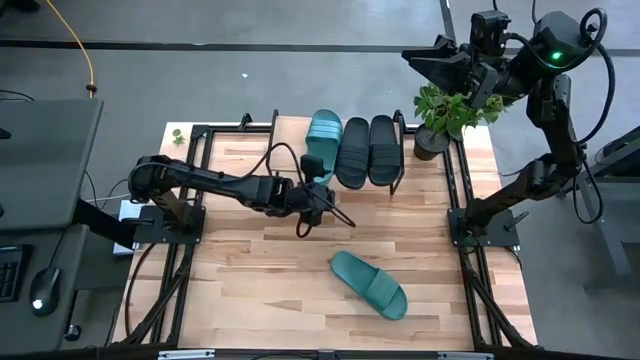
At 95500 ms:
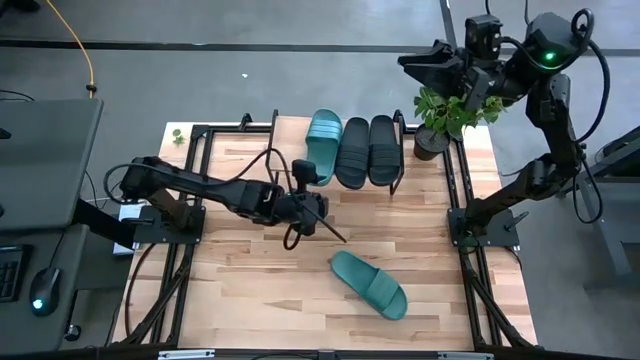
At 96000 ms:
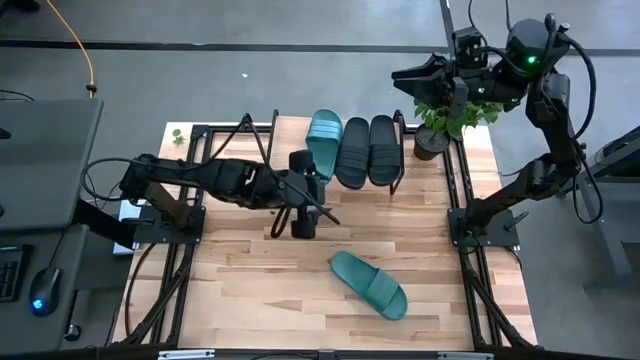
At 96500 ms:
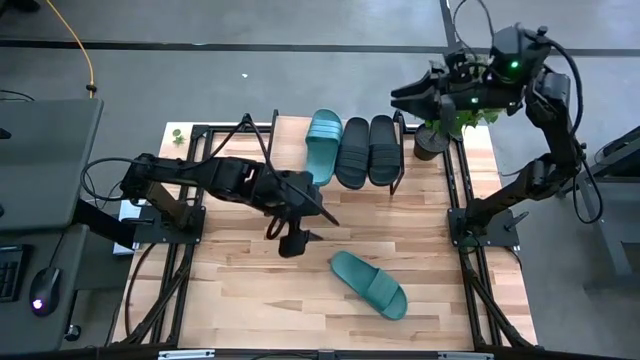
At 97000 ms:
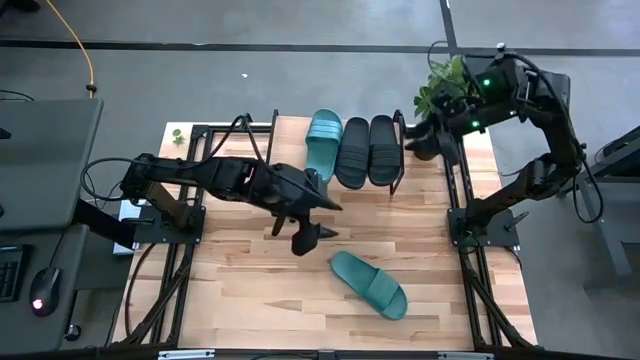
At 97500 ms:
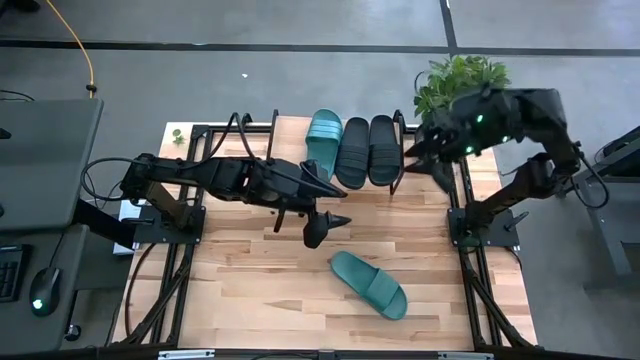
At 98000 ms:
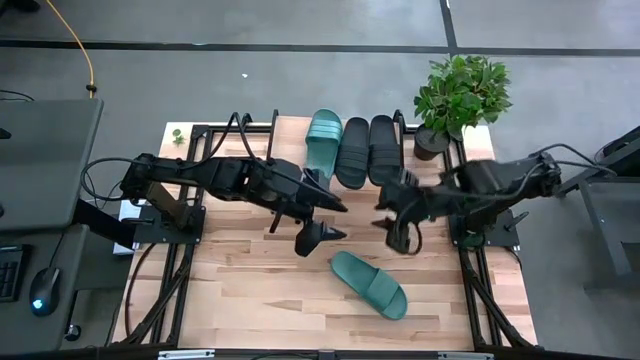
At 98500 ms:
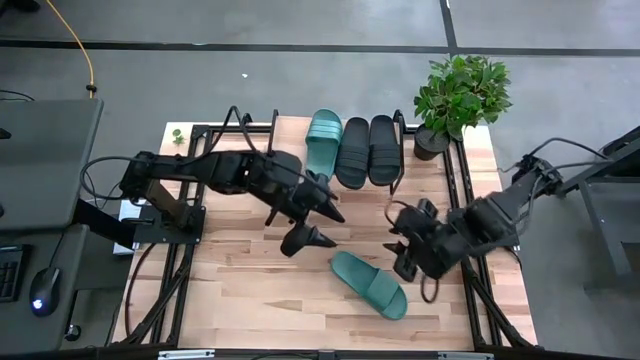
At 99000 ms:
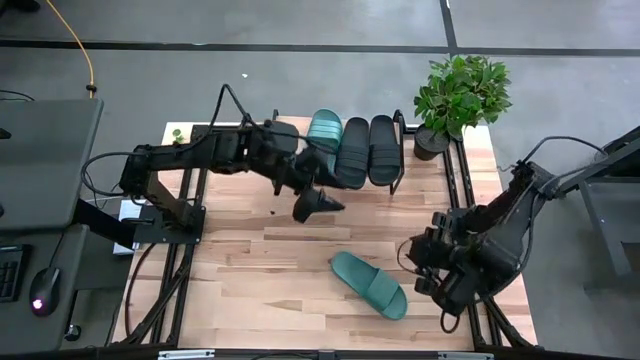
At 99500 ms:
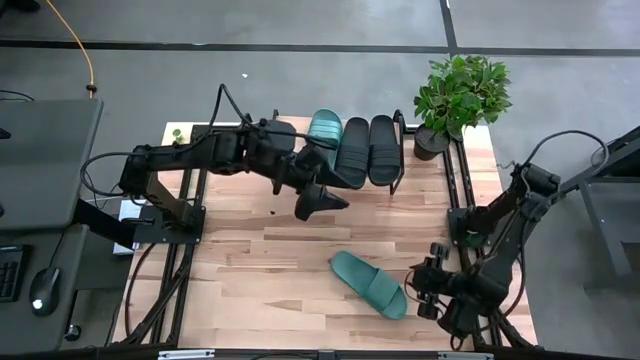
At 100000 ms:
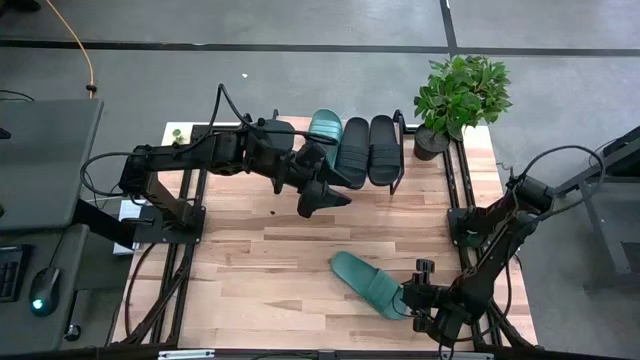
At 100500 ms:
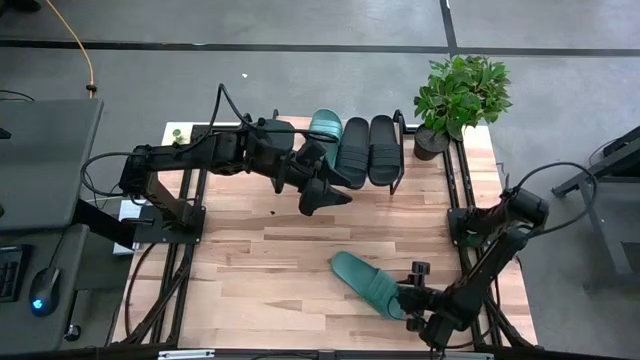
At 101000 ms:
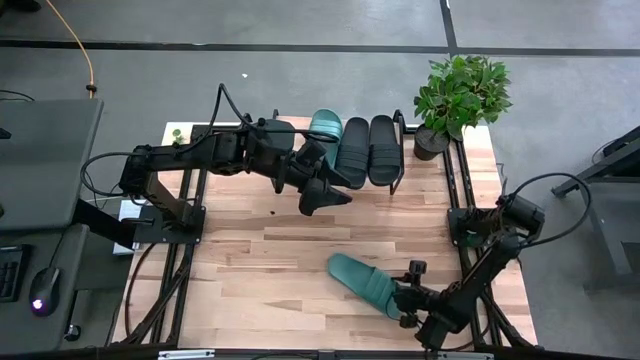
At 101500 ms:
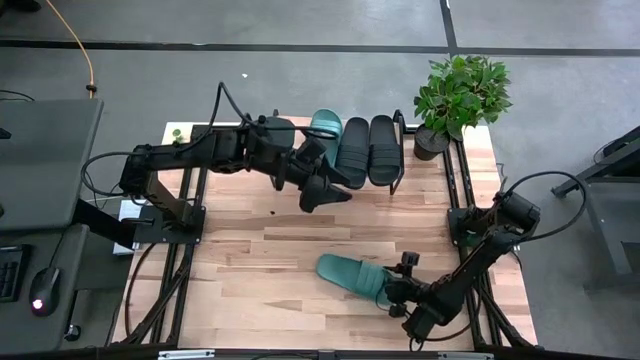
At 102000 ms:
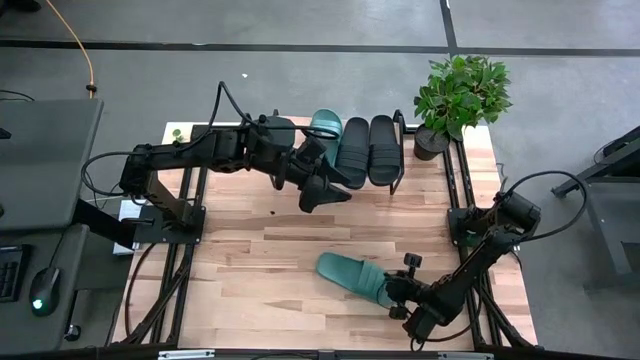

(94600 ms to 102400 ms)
Task: Pick and place slides into the shelf
Put the green slipper on the shelf

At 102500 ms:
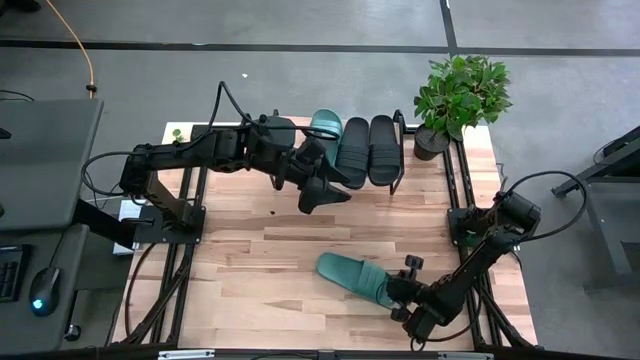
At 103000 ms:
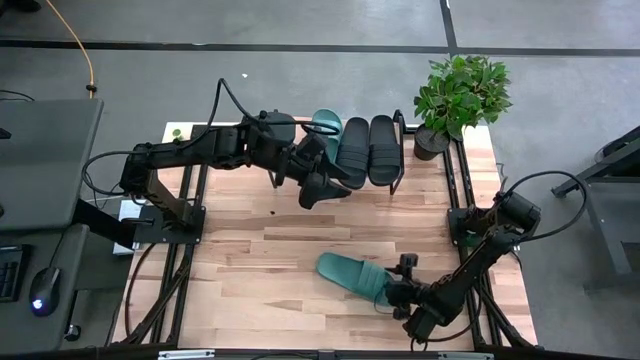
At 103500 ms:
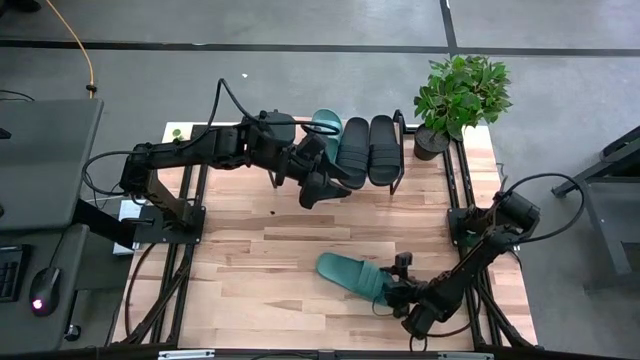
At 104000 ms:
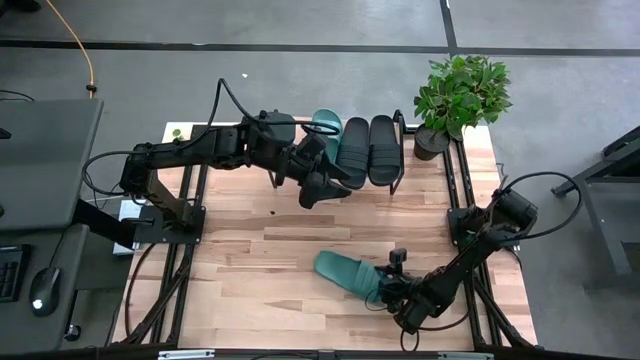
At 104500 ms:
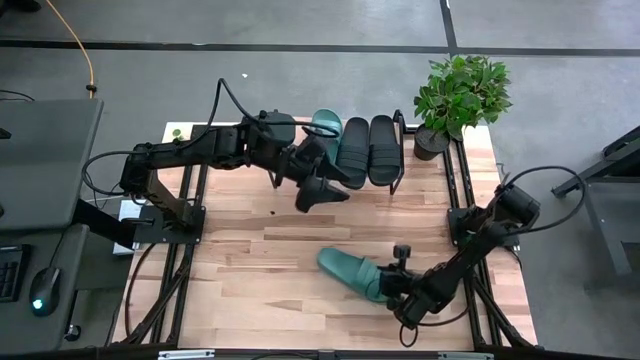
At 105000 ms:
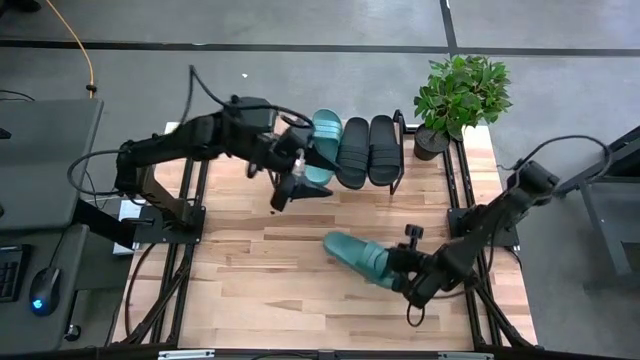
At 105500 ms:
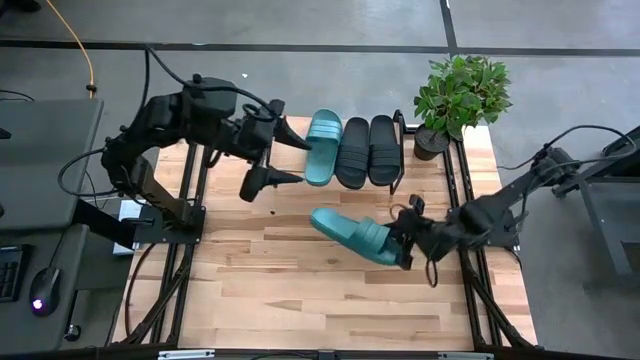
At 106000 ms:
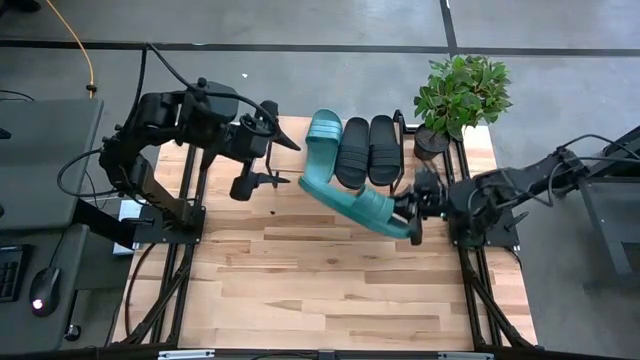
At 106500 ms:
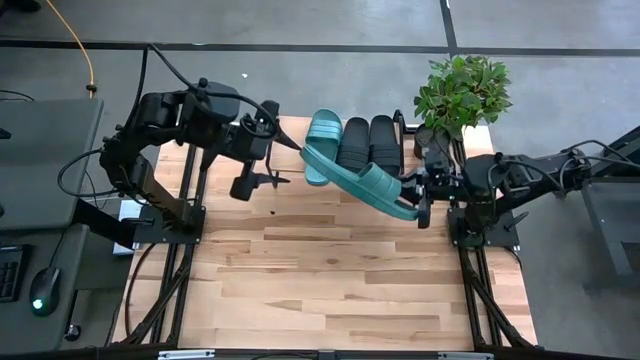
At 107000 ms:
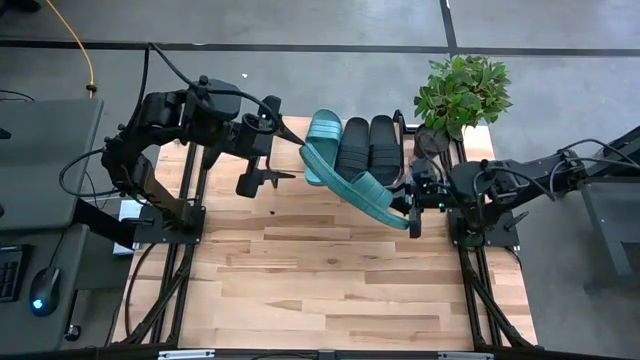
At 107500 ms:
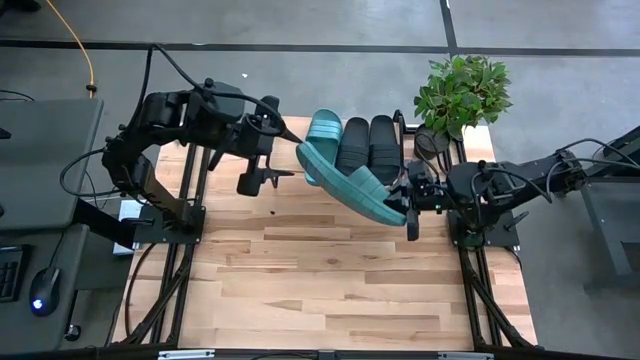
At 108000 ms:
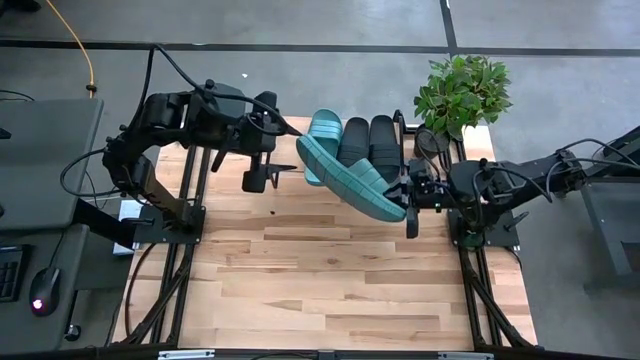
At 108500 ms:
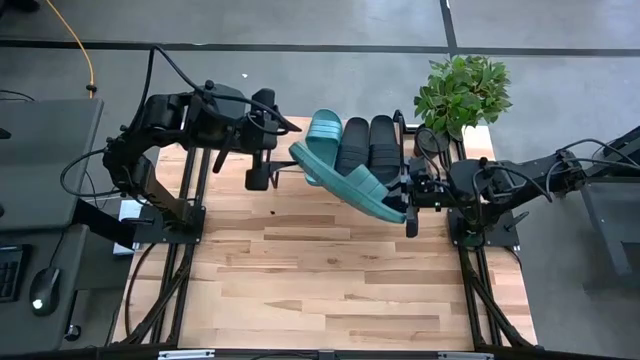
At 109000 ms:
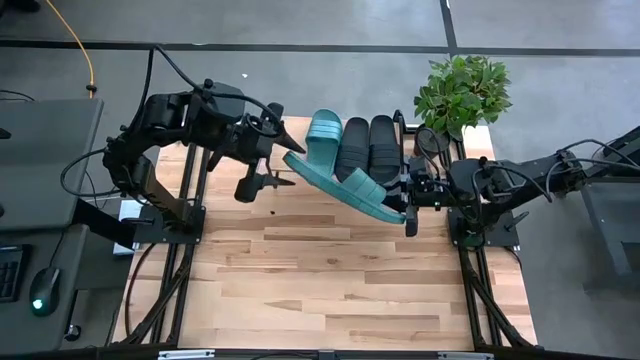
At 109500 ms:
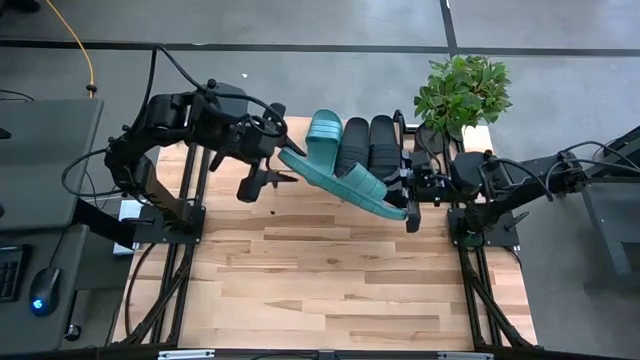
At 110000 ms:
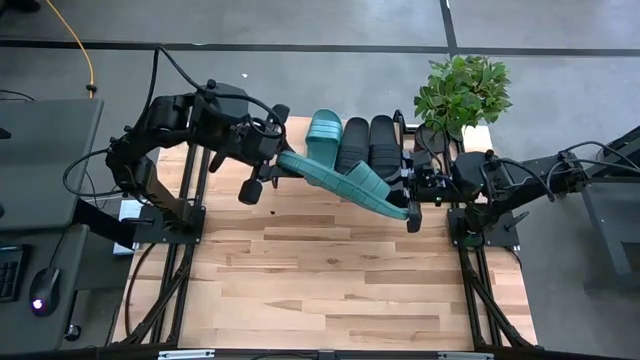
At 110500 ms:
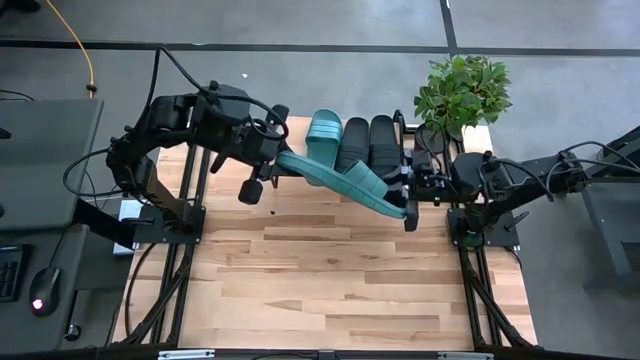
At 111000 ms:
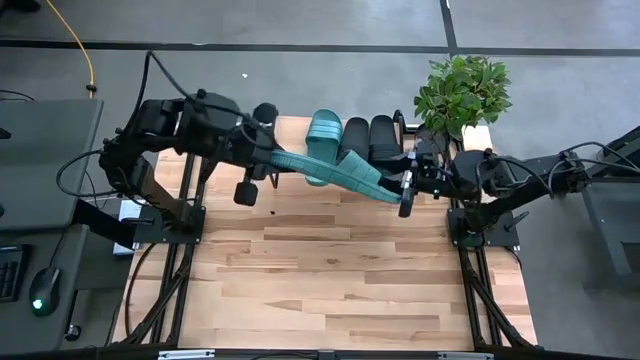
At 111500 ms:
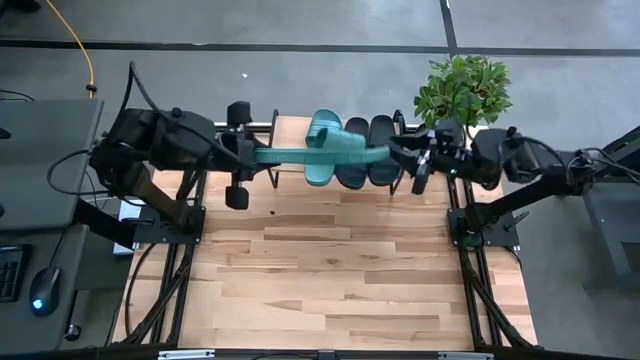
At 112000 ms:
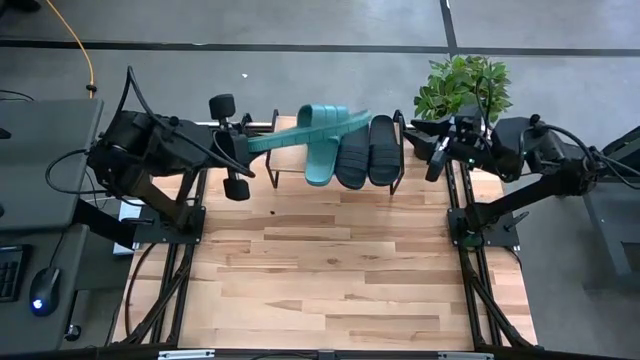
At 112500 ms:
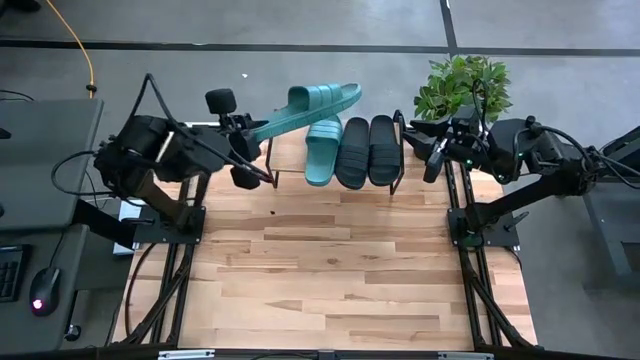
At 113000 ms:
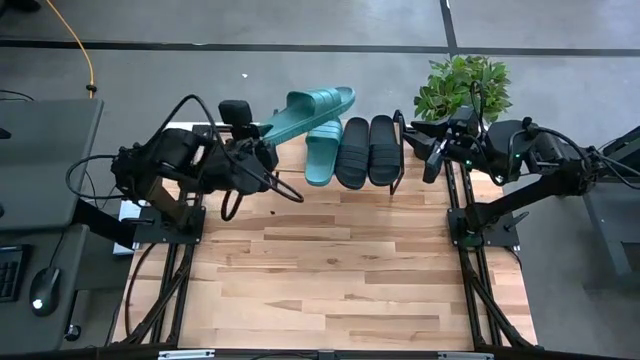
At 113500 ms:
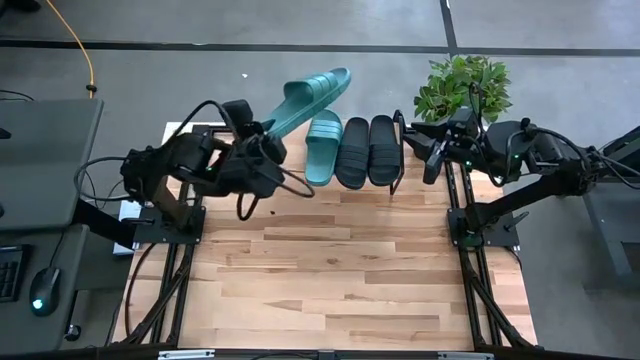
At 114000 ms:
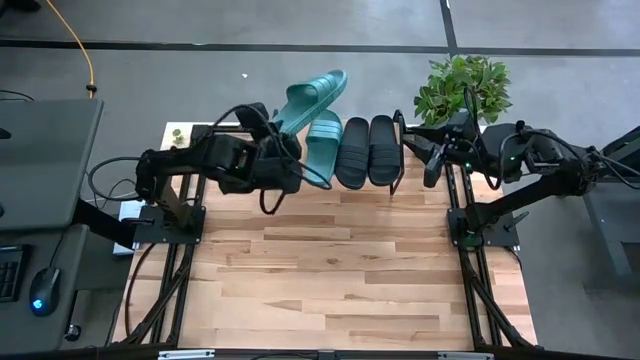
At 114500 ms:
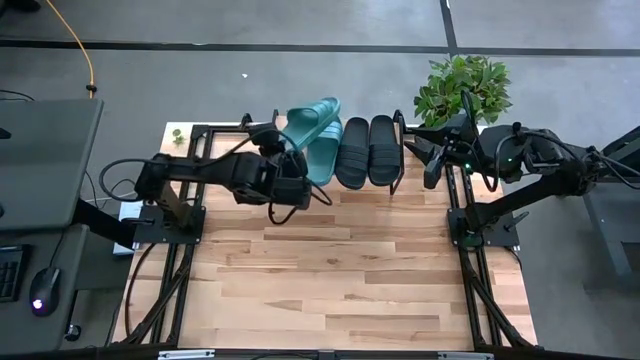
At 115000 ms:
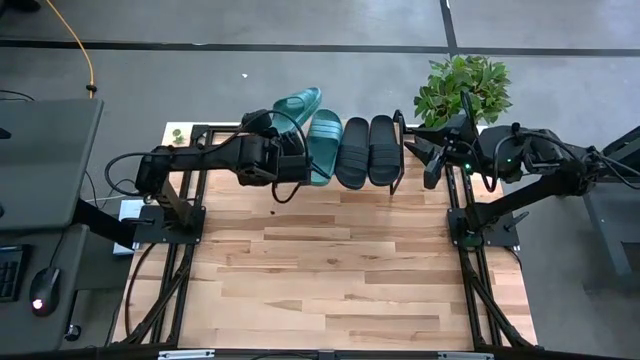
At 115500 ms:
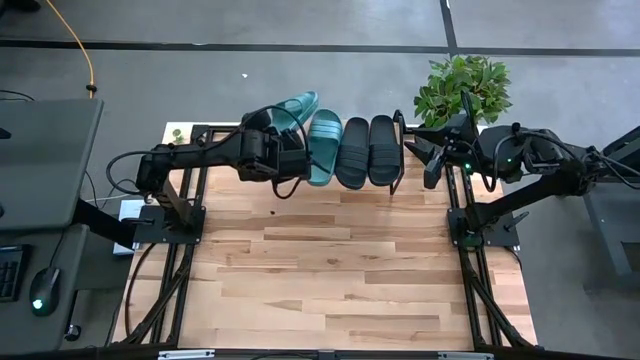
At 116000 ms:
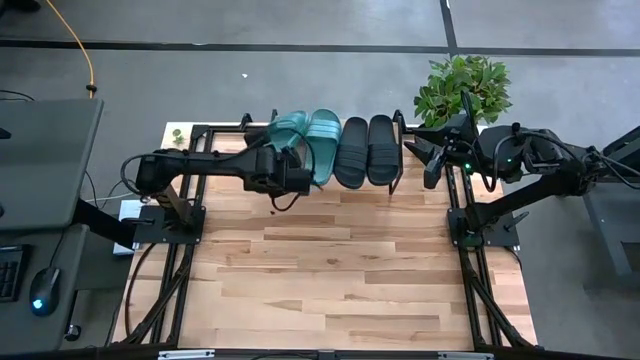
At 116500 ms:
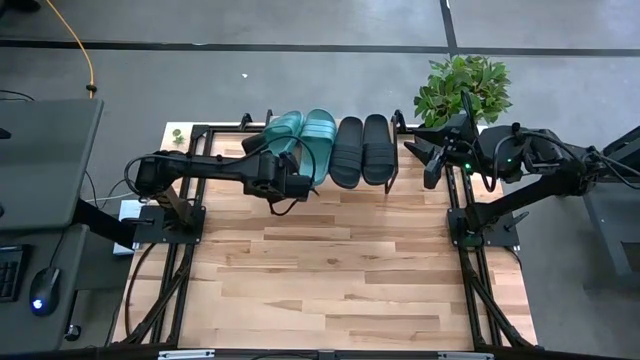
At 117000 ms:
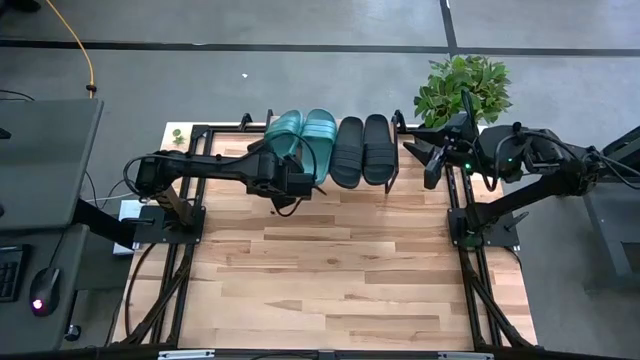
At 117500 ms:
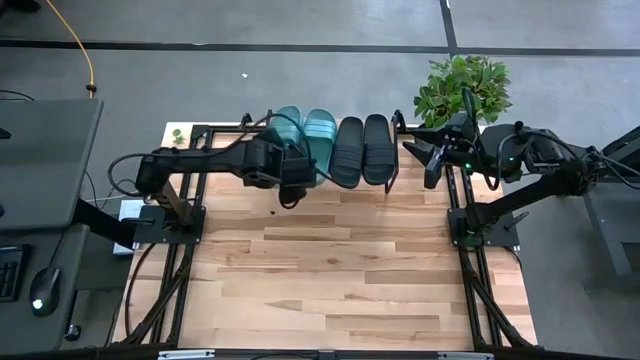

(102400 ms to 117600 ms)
Put the green slipper on the shelf
